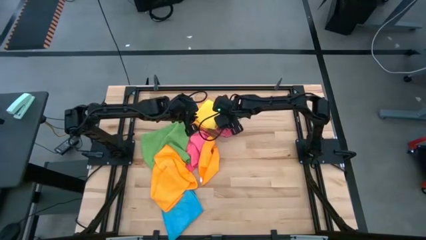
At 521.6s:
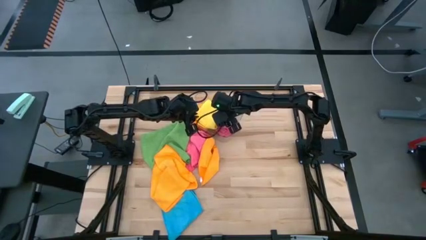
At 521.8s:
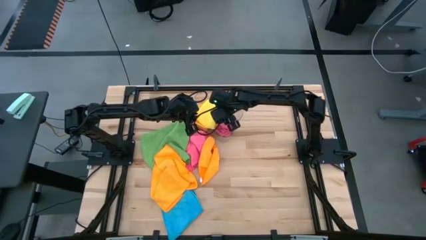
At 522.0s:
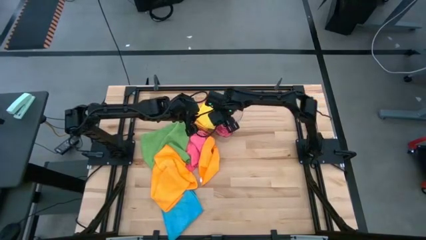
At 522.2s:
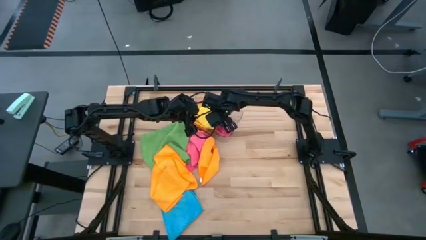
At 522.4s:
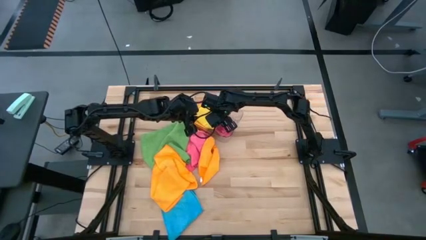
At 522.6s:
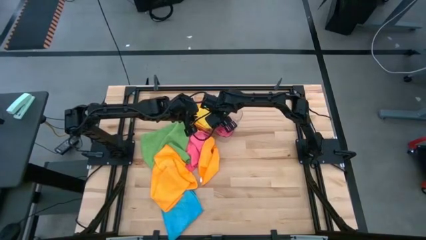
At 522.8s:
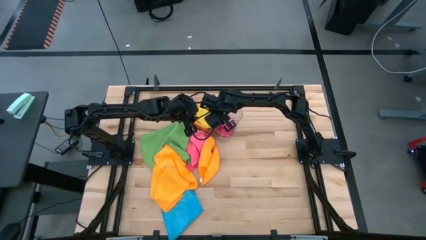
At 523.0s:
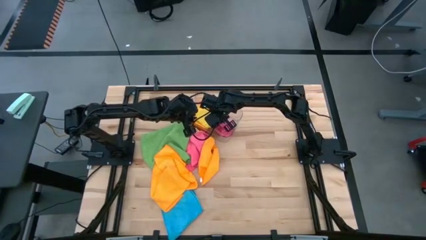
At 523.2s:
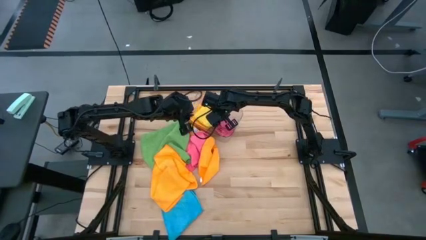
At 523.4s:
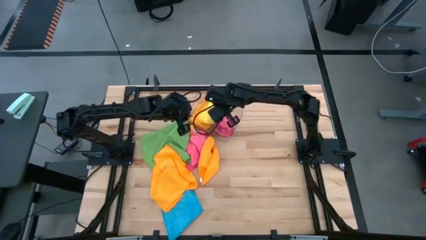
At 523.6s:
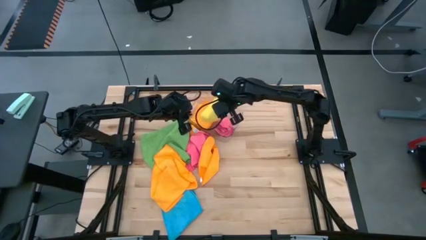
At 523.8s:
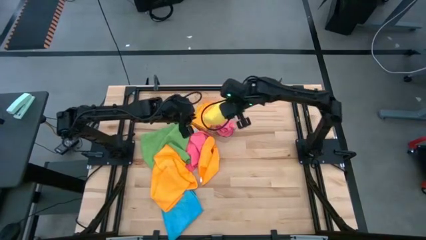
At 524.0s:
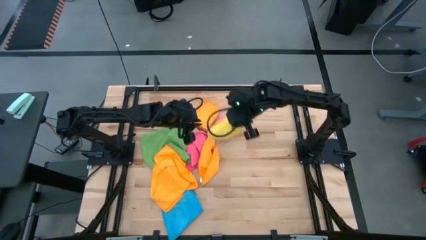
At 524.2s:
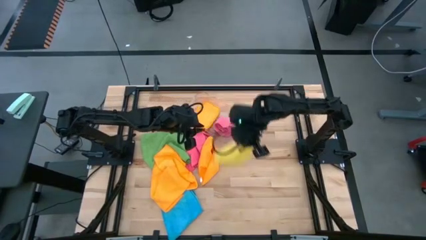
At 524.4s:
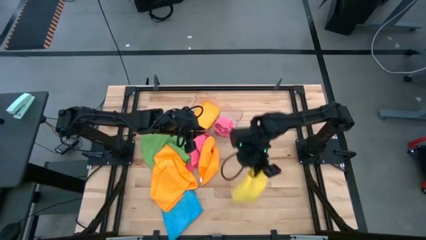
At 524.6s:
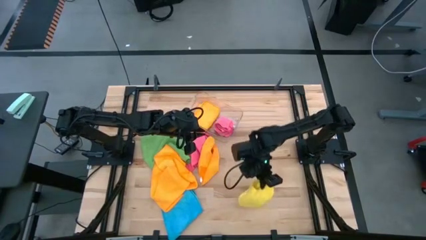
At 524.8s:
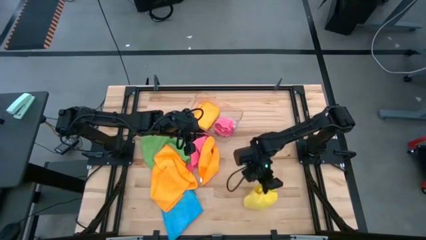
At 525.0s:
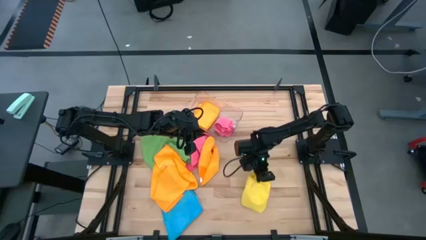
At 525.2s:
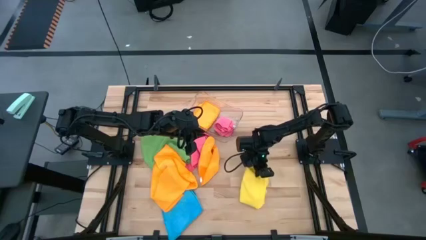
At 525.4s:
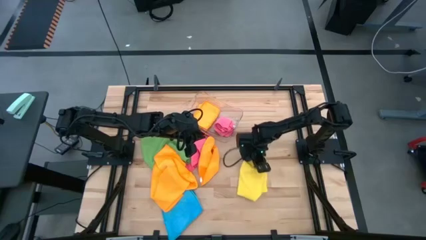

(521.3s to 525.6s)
Task: Fold microfiber towels
Remove the yellow microfiber cloth from the transparent bin

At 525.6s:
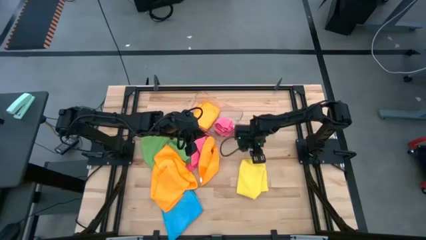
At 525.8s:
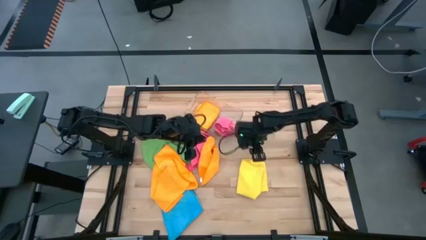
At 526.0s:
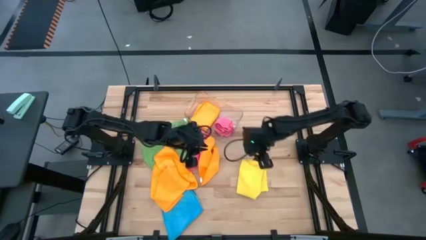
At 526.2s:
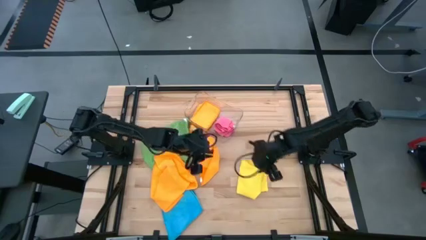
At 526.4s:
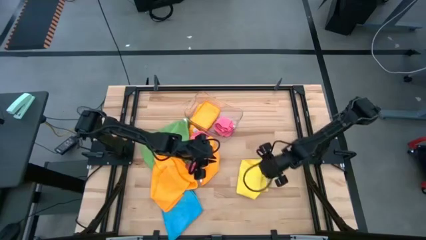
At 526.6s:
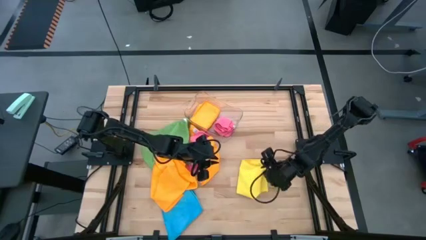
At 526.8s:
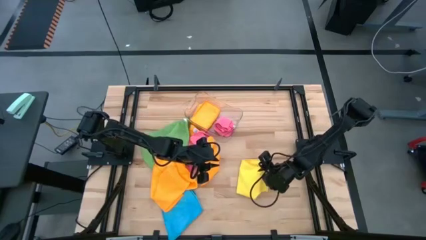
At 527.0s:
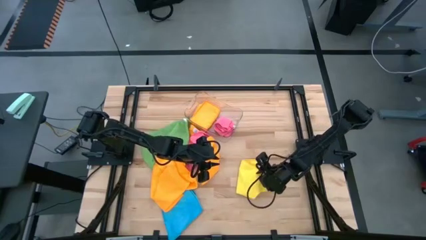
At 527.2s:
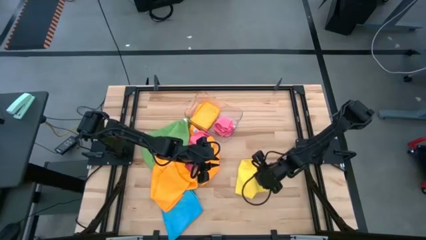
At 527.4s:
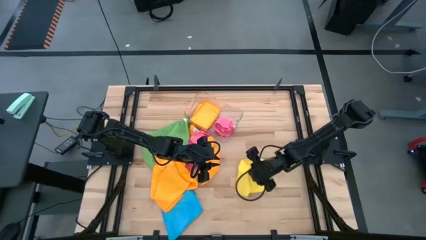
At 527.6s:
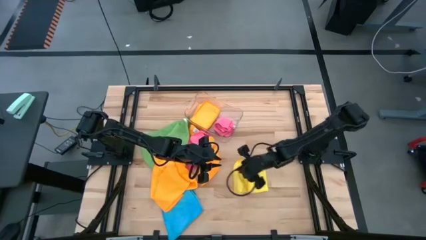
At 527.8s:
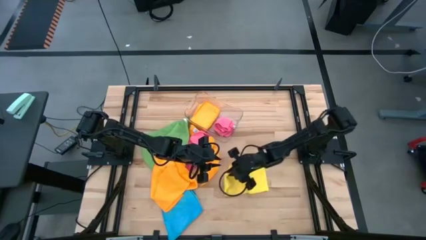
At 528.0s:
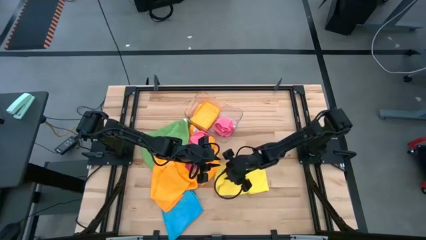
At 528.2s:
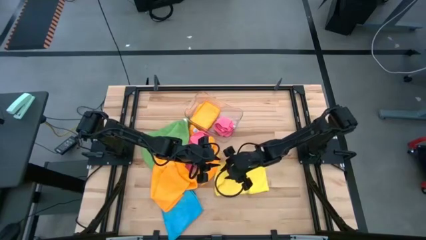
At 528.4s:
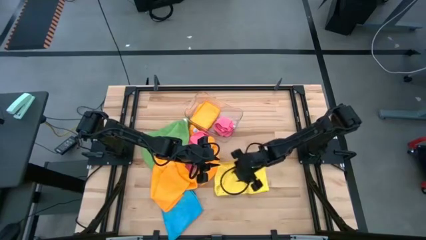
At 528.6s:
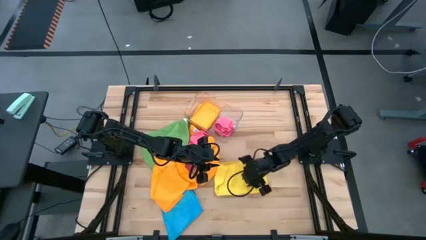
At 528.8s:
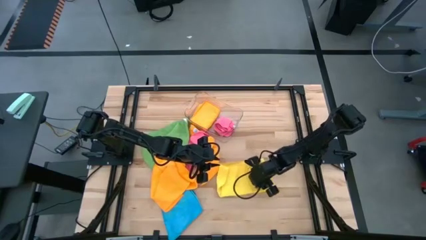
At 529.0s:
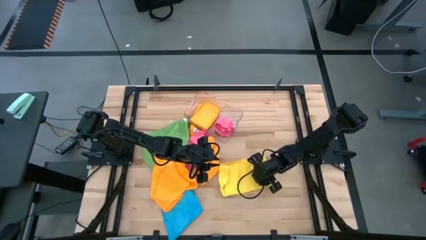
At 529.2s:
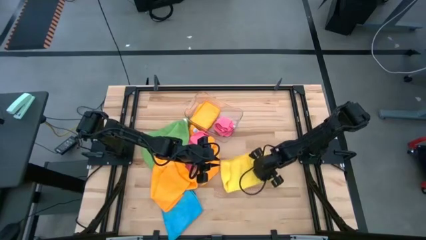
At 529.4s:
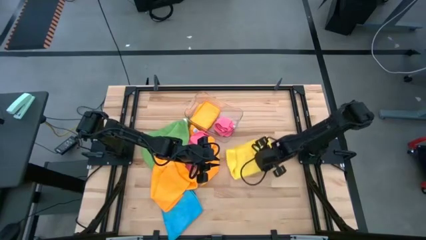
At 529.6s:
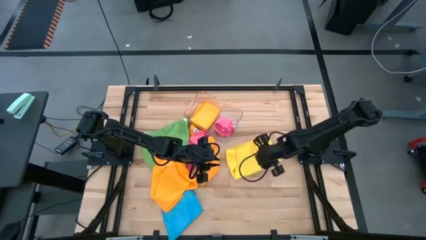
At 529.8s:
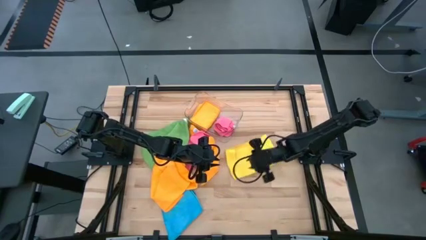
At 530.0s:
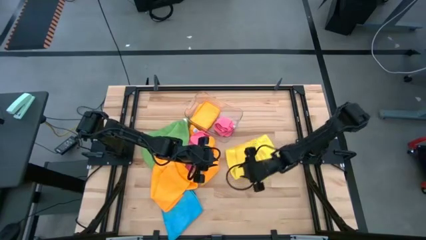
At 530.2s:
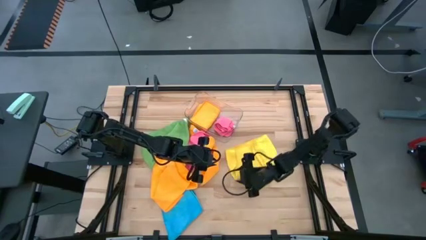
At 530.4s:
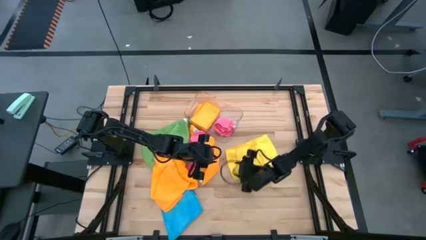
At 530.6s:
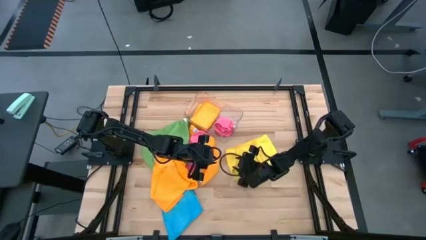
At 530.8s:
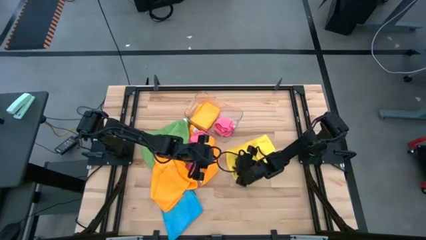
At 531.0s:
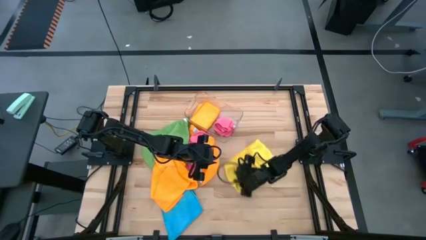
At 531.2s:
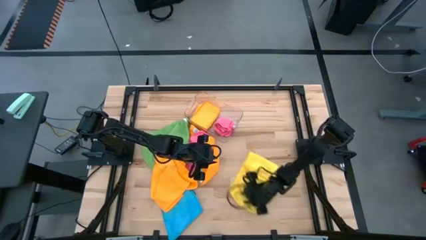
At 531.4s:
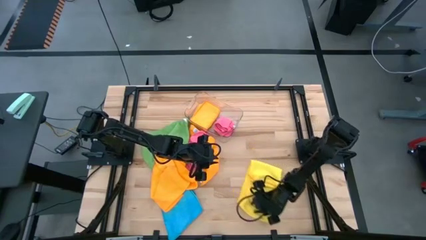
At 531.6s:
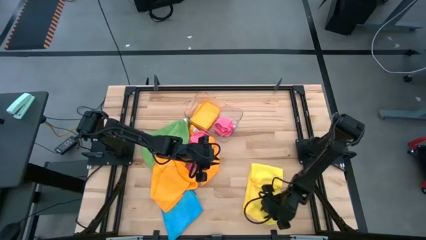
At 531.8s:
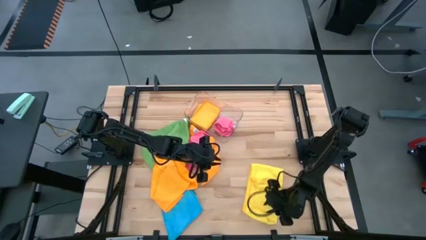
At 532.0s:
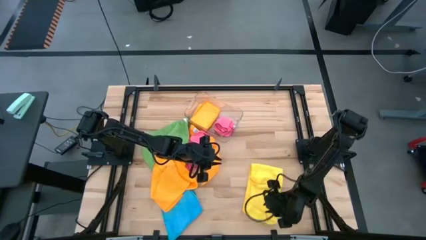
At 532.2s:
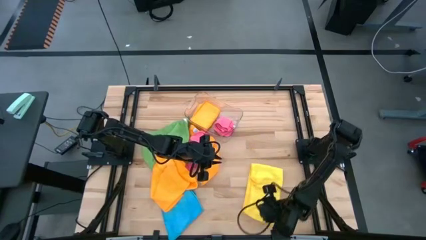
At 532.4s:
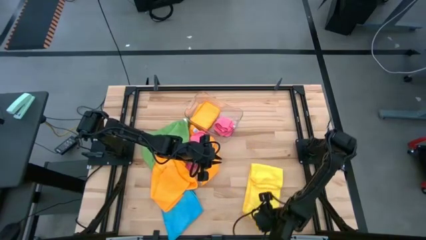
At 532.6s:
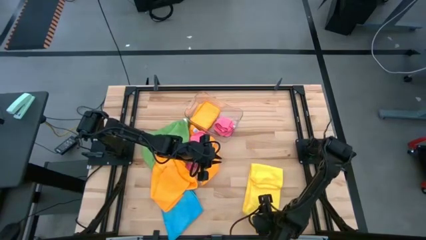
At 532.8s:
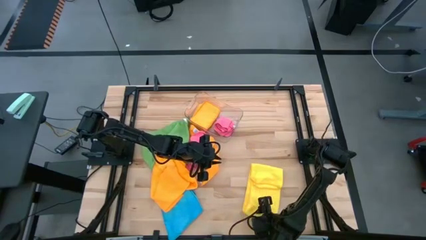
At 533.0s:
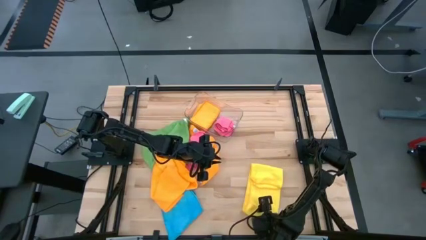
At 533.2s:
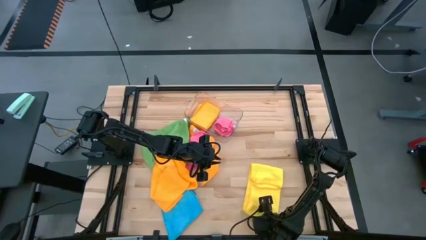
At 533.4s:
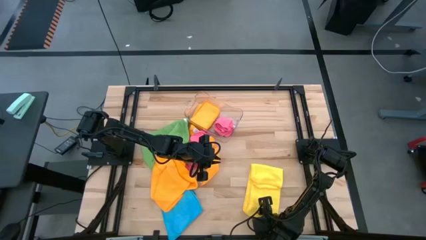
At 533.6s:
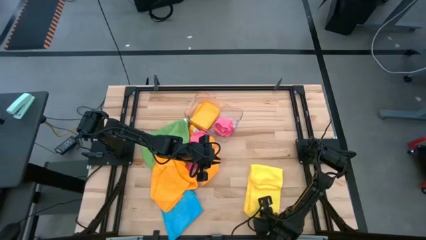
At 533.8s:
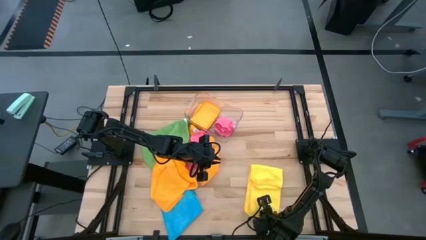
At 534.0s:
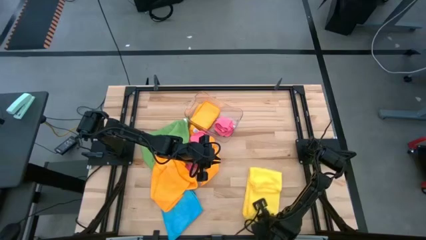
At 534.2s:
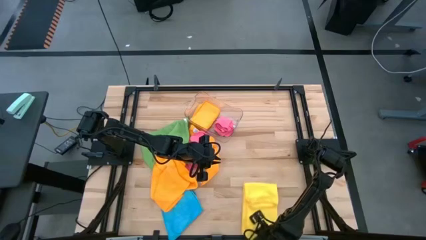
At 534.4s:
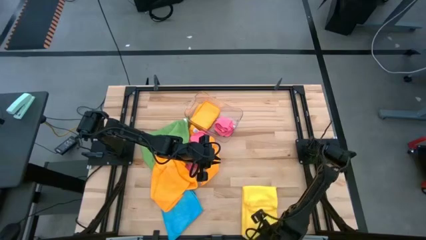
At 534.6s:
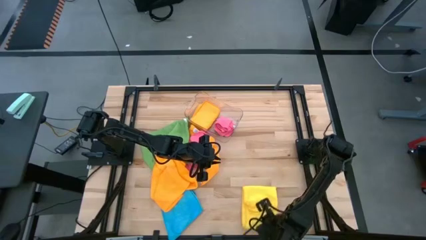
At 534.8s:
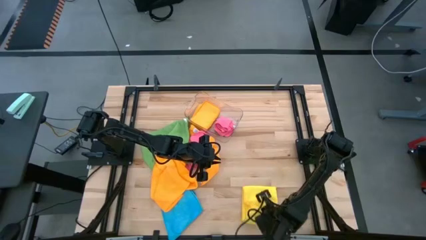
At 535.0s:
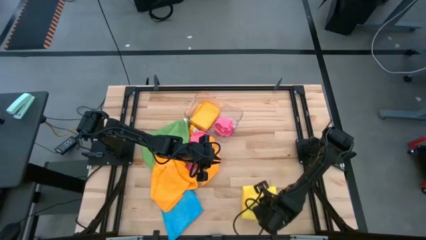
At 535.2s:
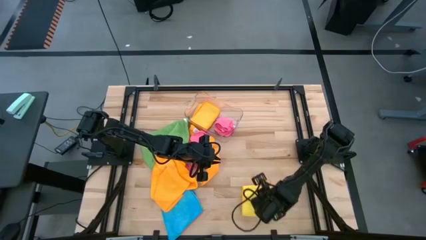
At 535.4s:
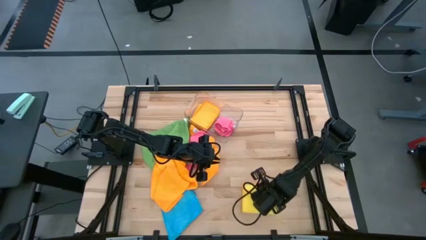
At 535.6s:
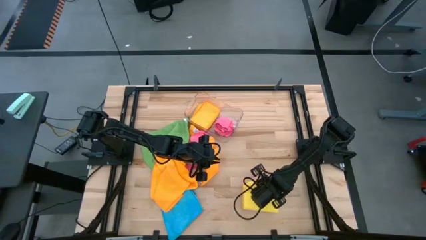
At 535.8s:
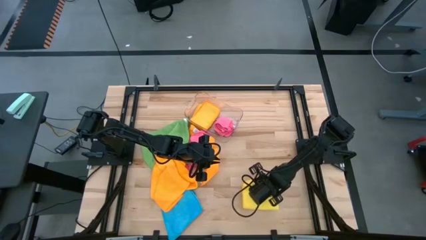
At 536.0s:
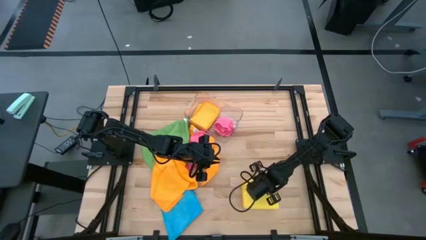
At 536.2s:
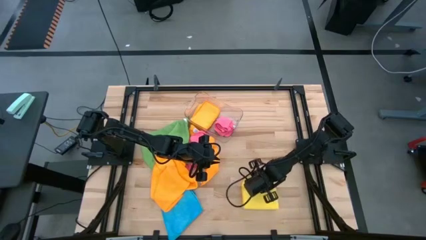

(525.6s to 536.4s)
Fold the yellow microfiber cloth

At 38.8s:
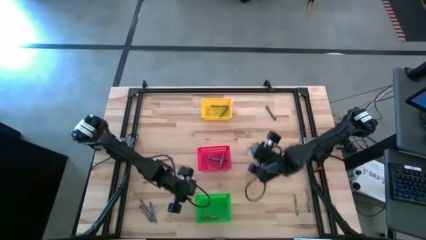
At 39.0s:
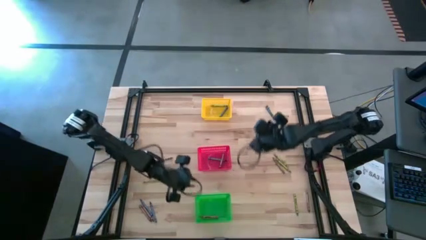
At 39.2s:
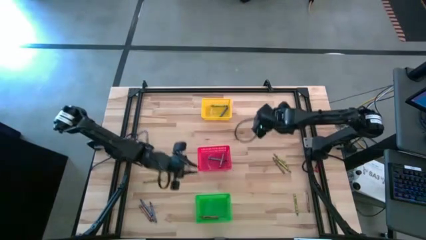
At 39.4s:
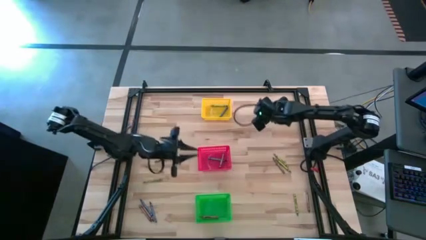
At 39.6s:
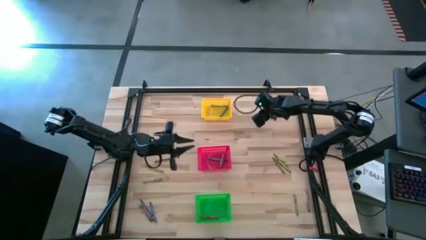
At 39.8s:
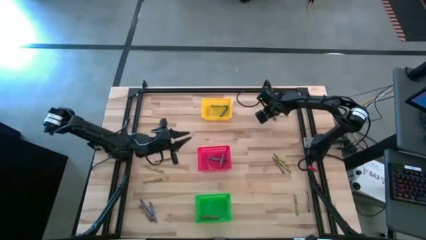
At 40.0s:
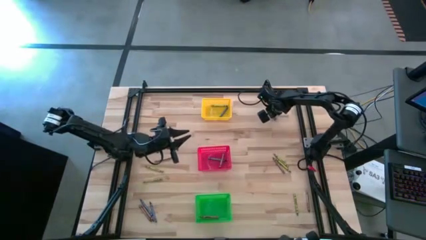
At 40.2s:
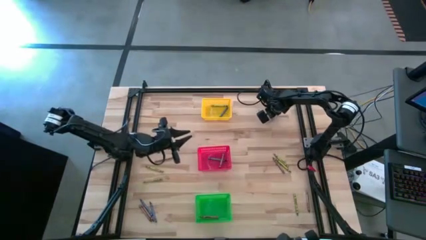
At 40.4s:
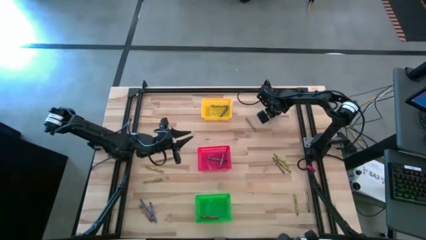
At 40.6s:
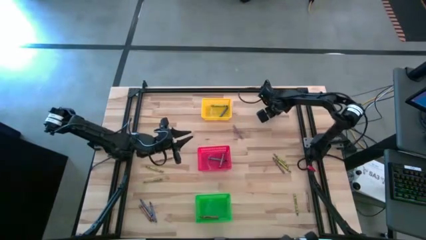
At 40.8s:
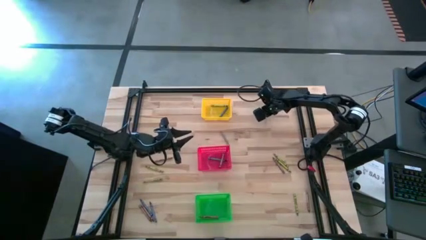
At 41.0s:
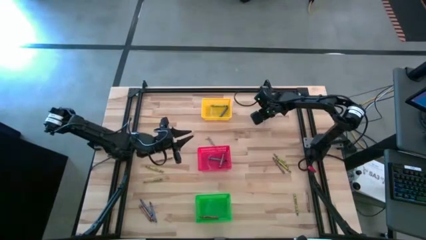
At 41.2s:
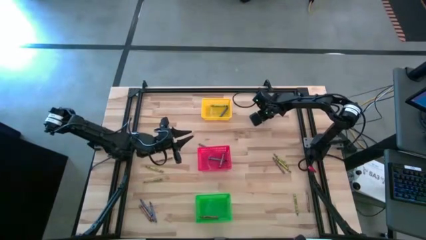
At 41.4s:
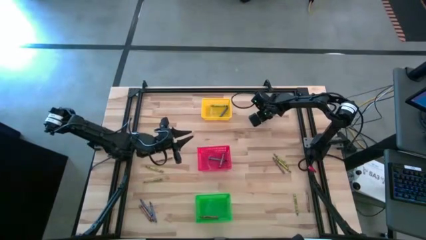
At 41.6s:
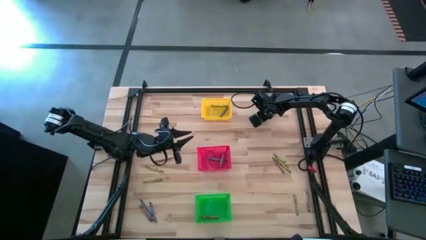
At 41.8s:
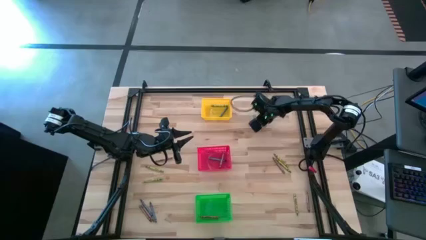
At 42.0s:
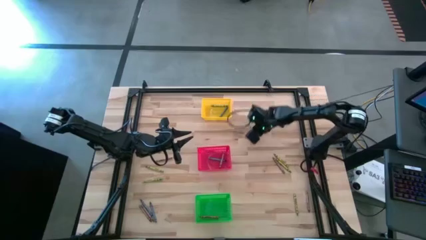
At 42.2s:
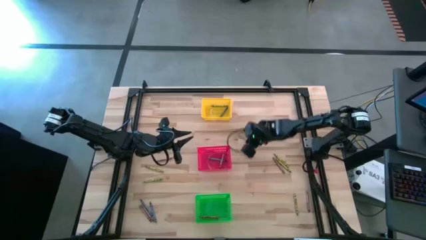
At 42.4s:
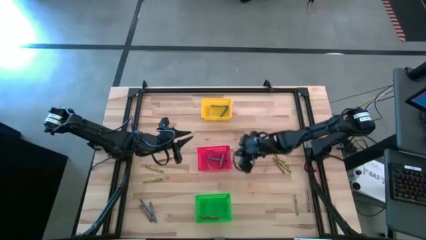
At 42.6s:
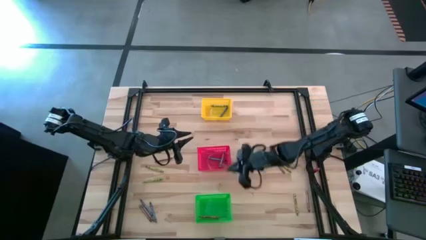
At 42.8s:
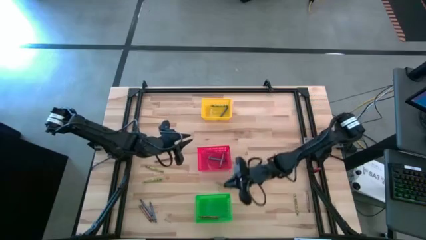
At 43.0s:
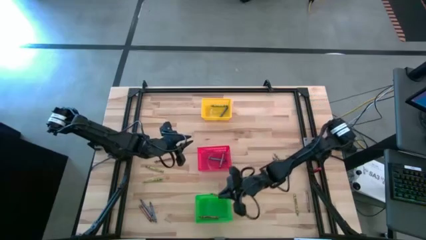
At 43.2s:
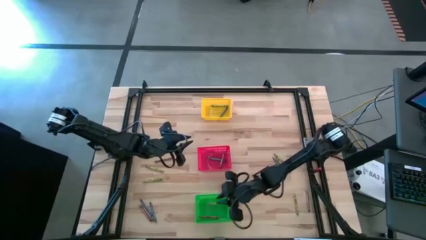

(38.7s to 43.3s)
Task: Sort crayons
Put the green crayon into the green bin
